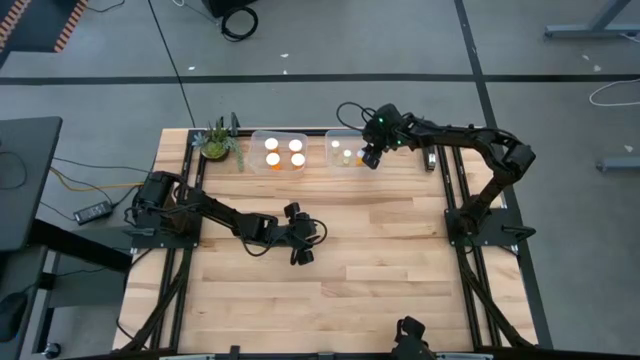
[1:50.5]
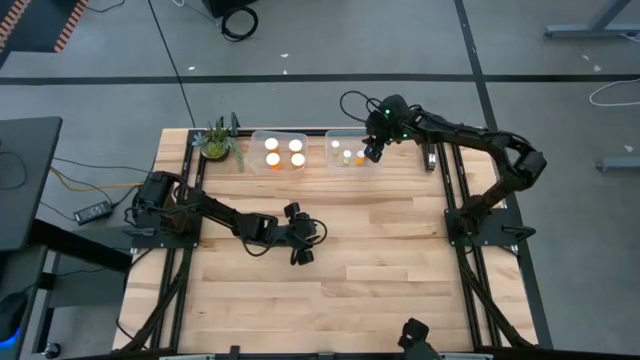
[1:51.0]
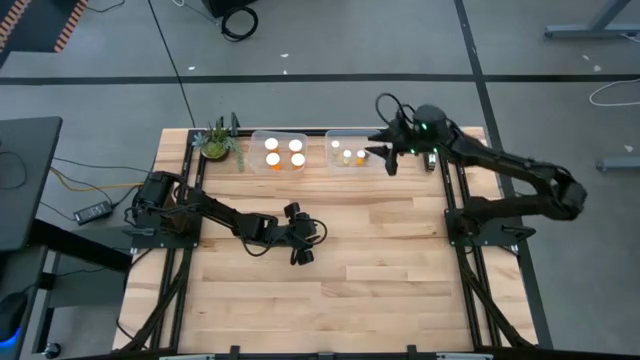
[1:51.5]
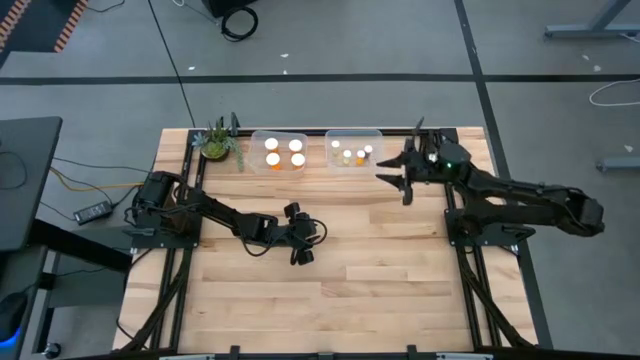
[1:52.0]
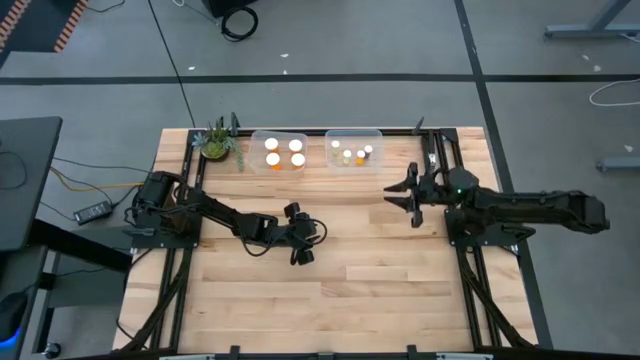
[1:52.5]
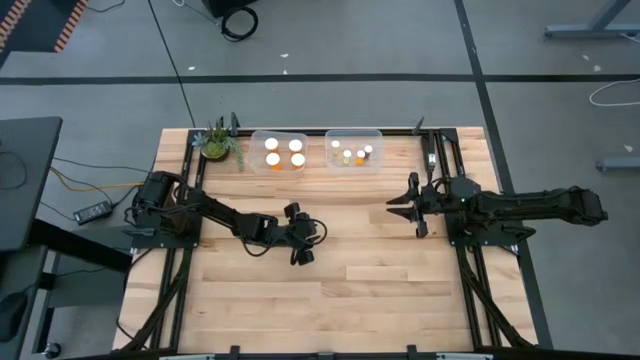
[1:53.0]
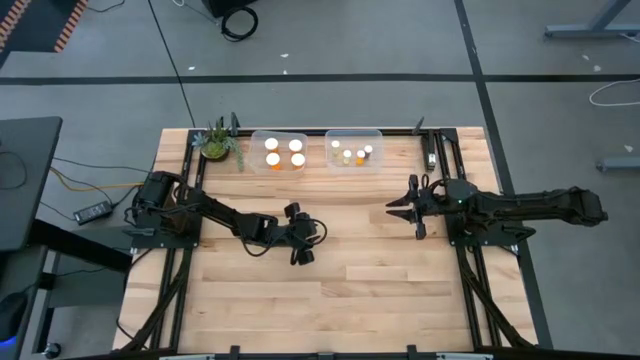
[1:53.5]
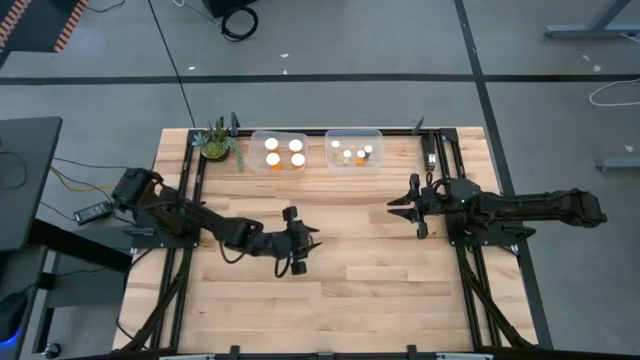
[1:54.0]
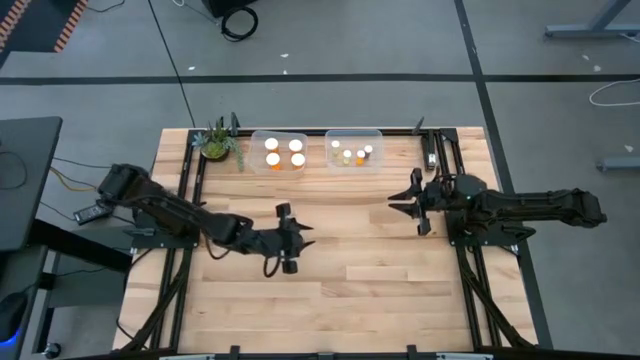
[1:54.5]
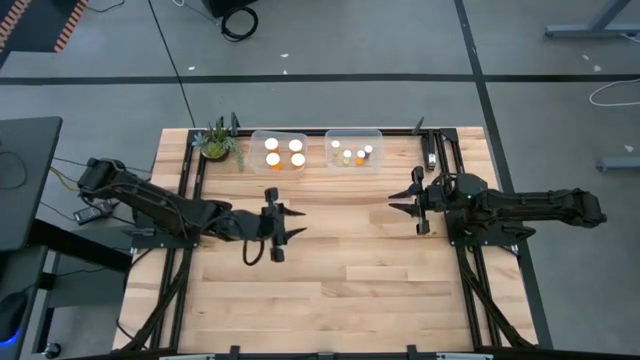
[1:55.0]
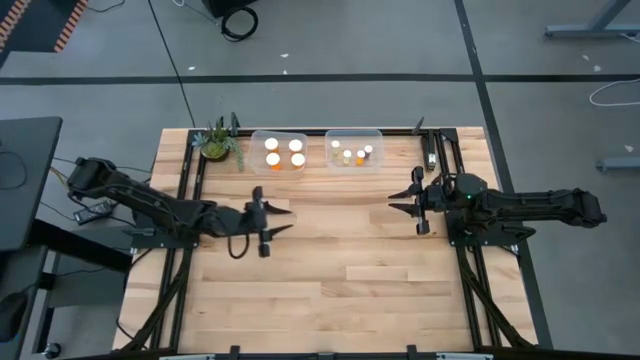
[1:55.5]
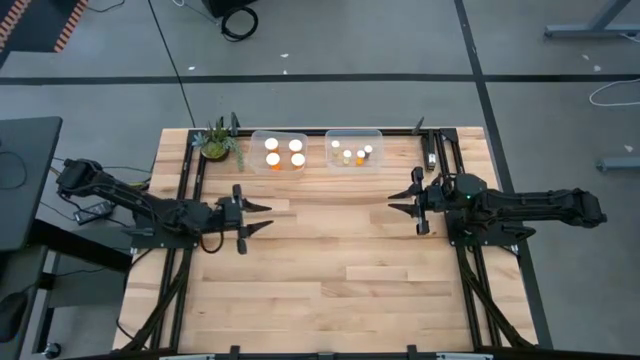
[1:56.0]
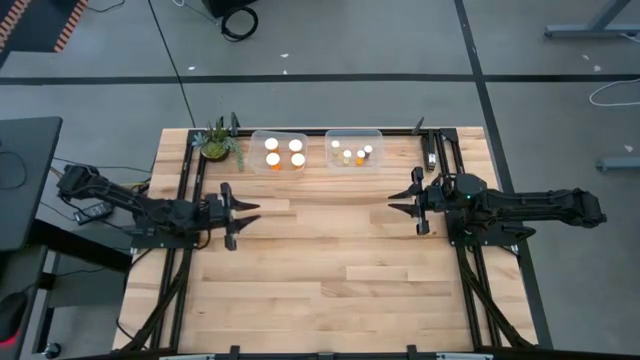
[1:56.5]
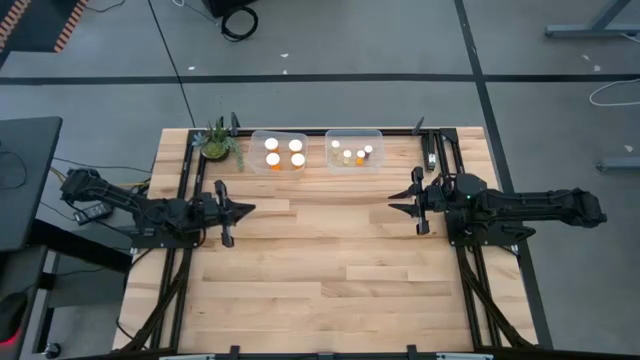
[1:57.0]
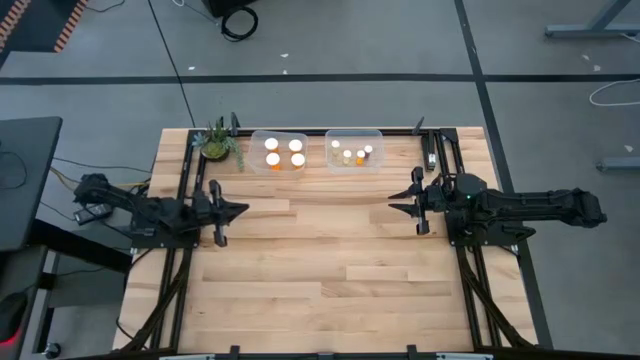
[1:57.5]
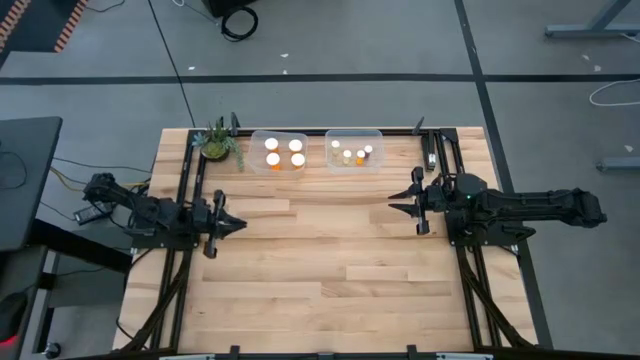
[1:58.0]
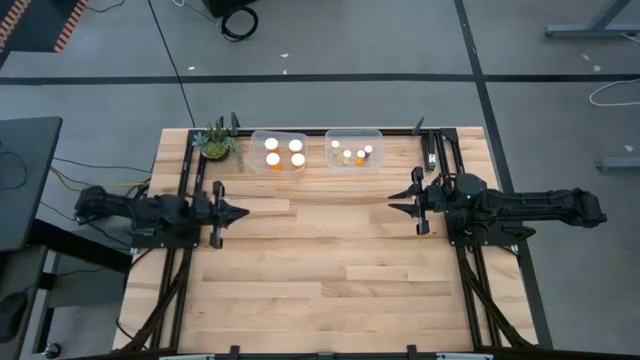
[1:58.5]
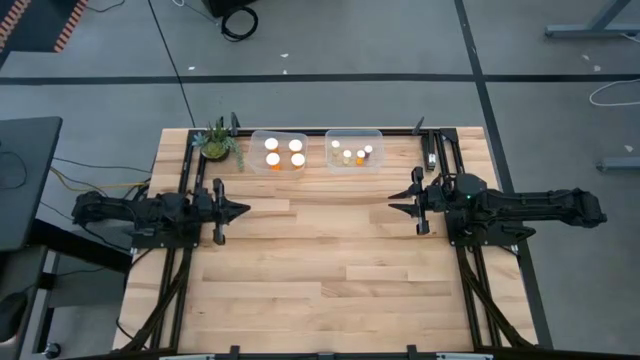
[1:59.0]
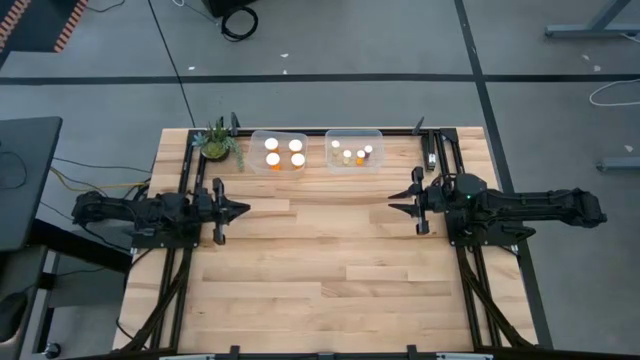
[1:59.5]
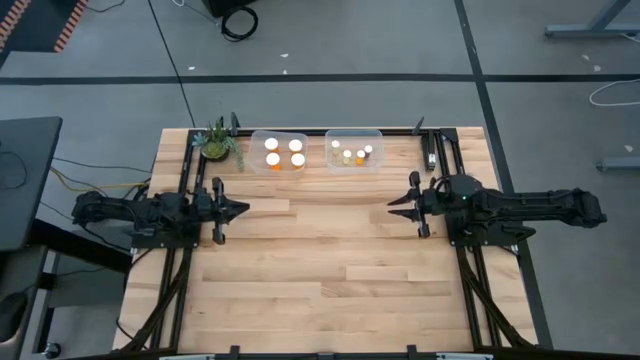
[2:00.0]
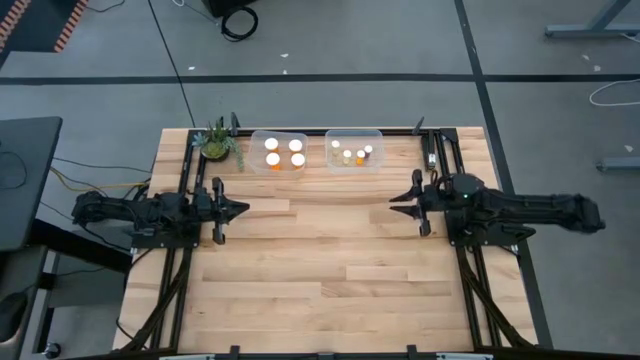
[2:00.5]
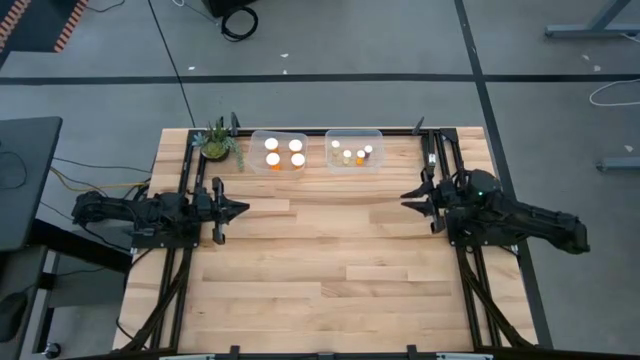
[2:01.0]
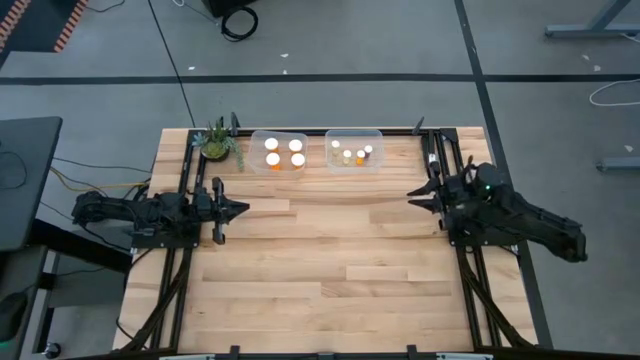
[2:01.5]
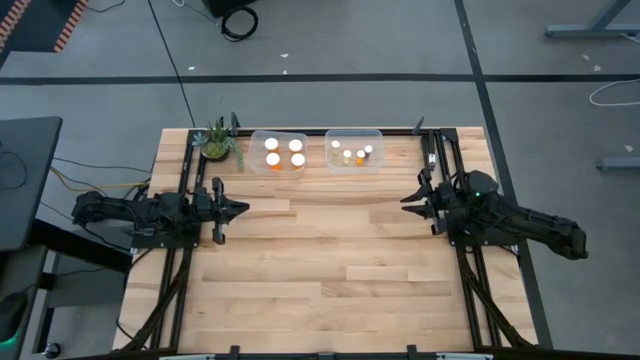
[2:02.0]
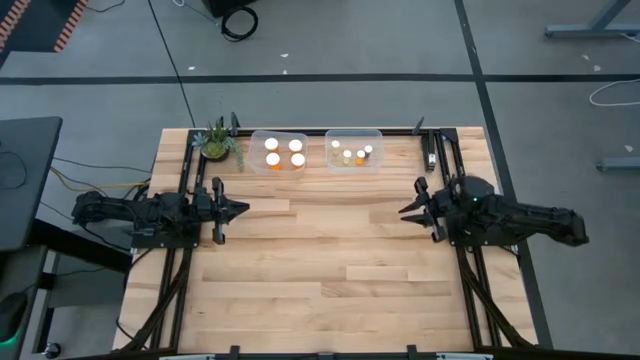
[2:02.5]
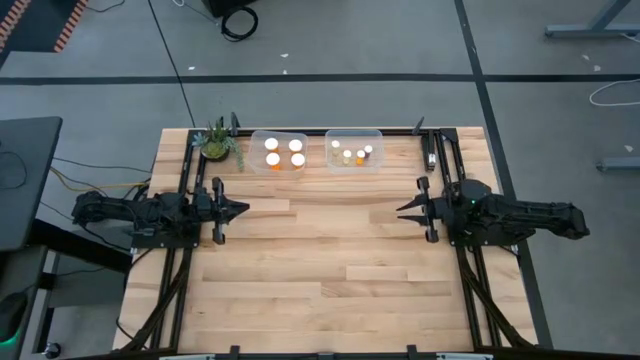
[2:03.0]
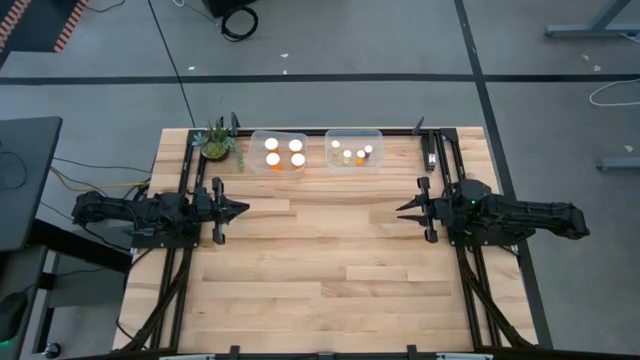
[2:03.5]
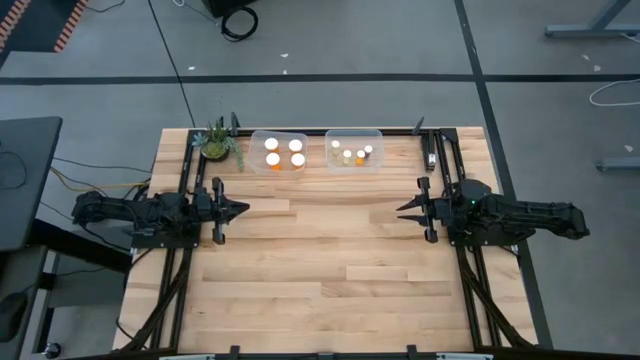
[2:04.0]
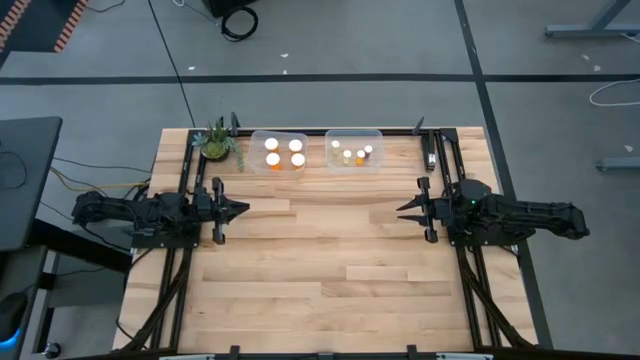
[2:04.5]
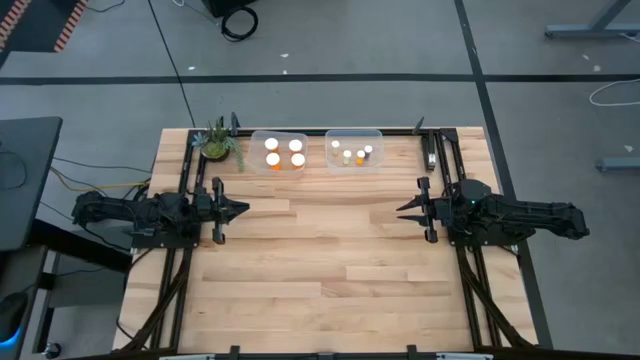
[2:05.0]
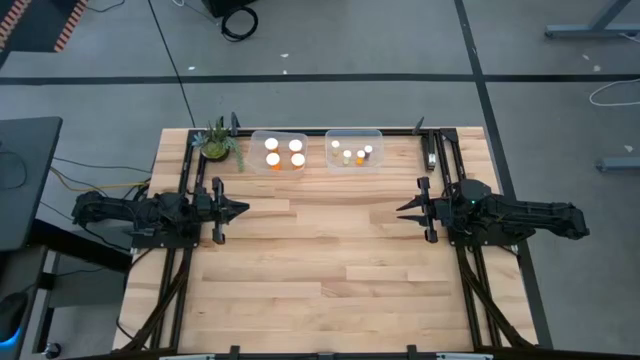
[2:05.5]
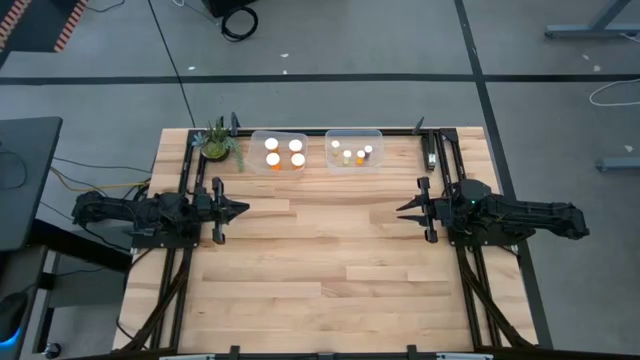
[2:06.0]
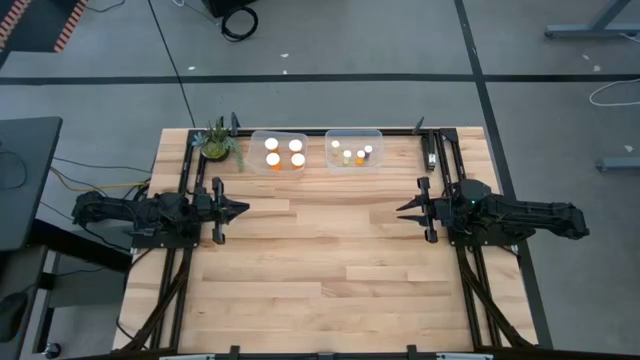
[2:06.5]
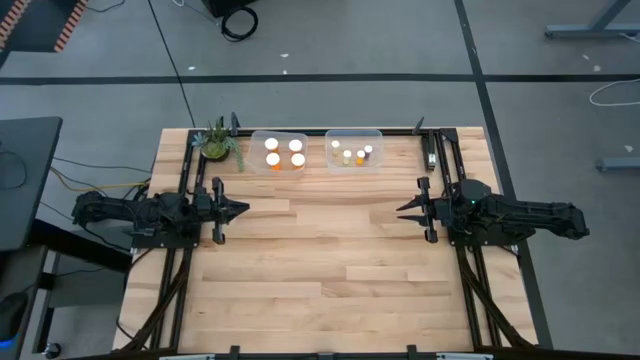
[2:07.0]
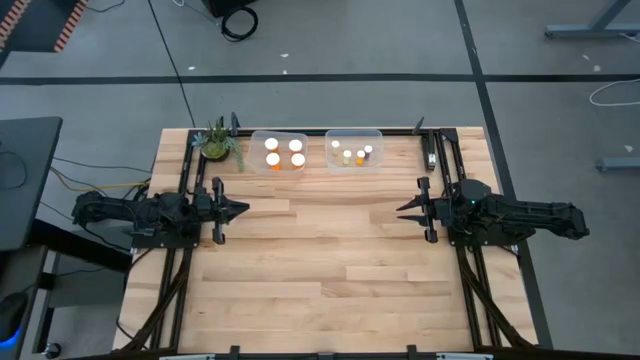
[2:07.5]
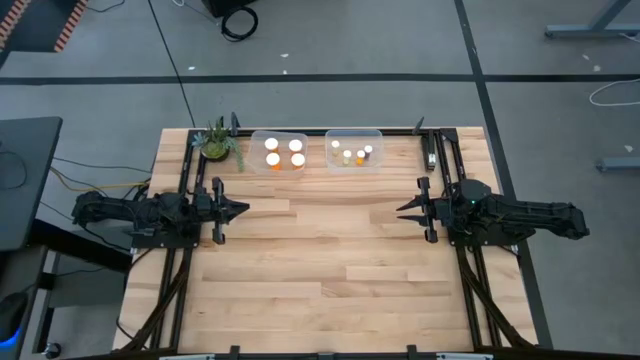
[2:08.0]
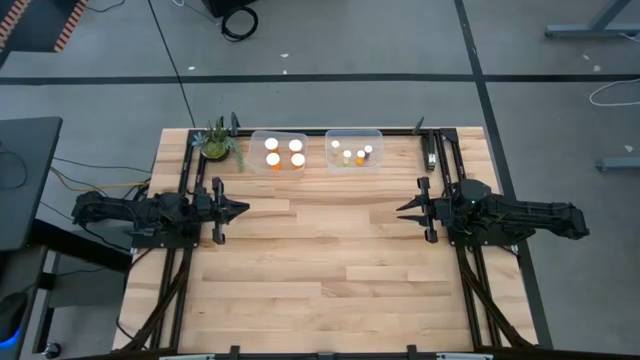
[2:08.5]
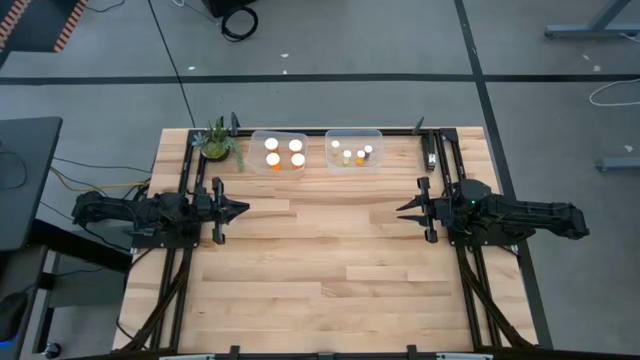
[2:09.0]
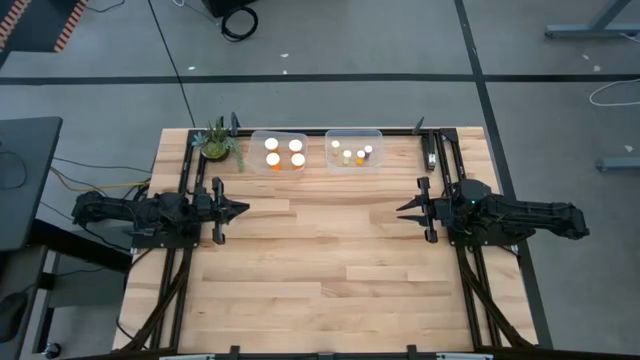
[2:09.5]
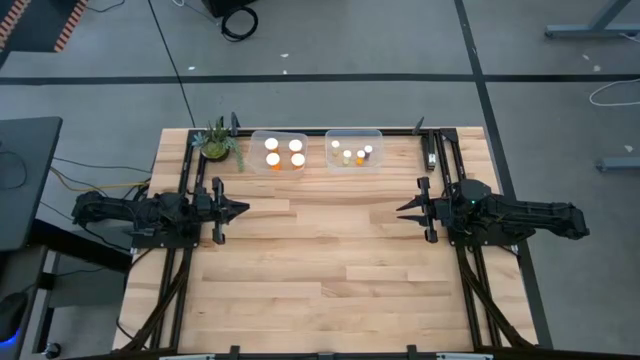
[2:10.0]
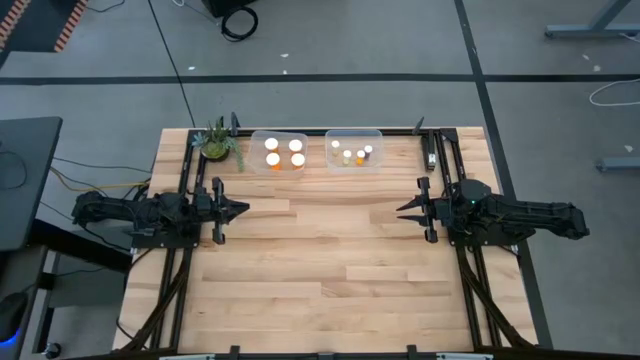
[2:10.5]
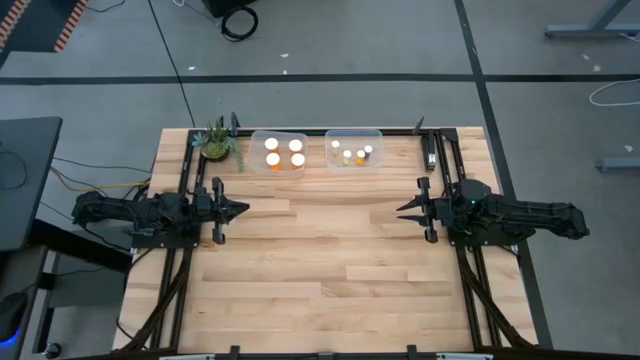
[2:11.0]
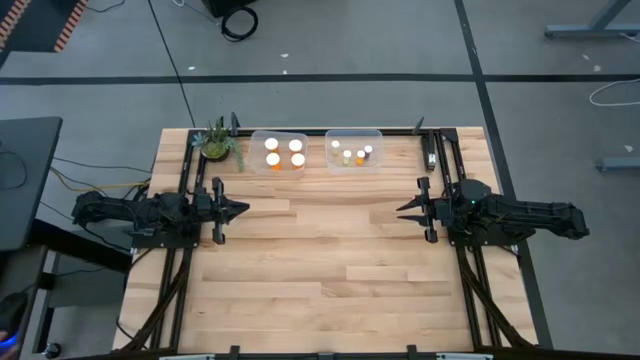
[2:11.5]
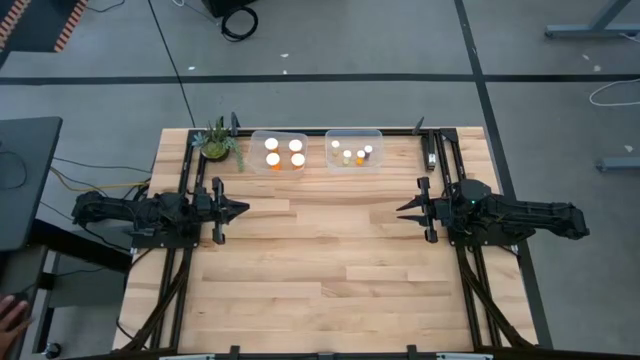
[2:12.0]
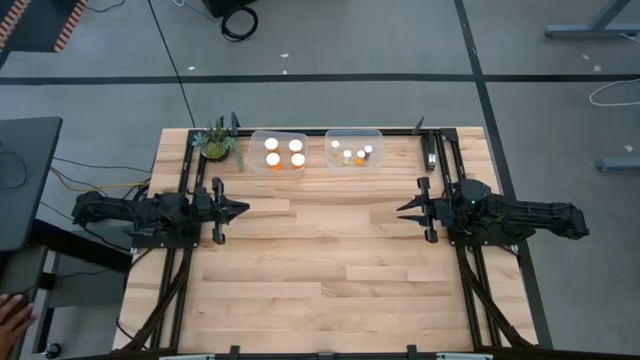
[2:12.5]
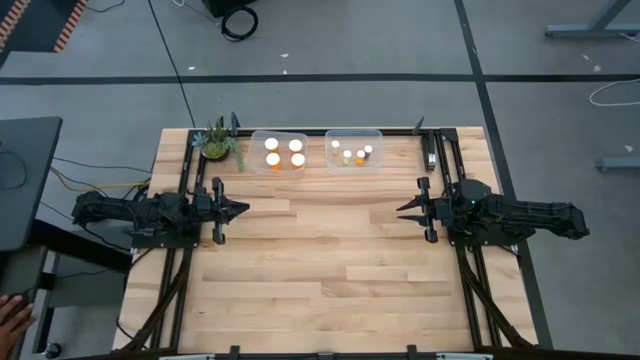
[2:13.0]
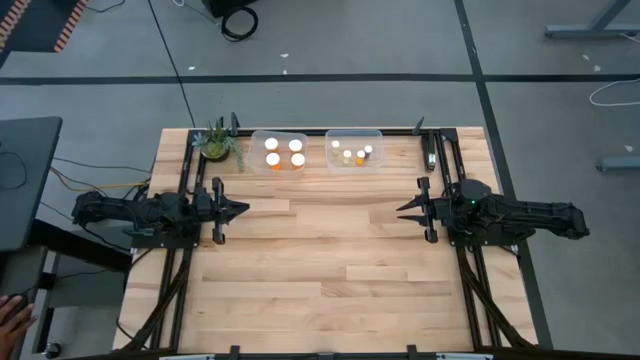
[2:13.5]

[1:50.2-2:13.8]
Task: Pick and place medicine bottles into bin by pill shape (circle, oval)
Return to Home Position
